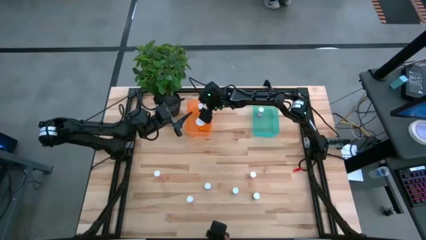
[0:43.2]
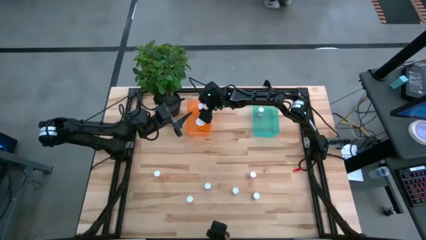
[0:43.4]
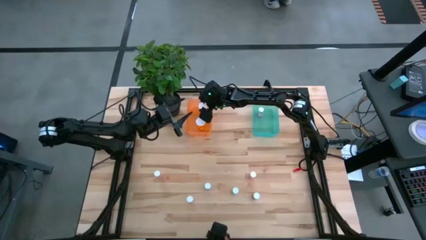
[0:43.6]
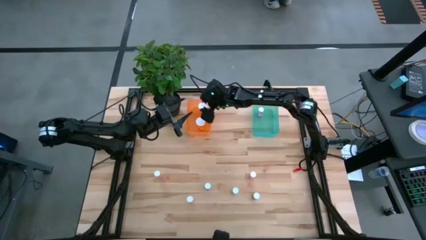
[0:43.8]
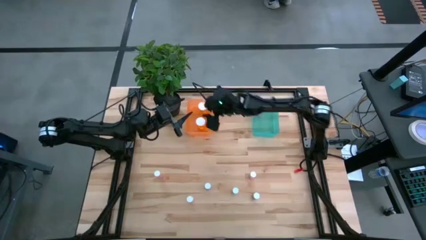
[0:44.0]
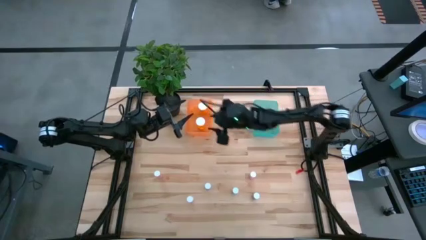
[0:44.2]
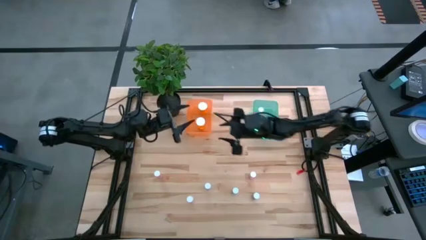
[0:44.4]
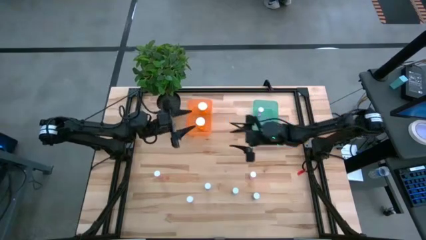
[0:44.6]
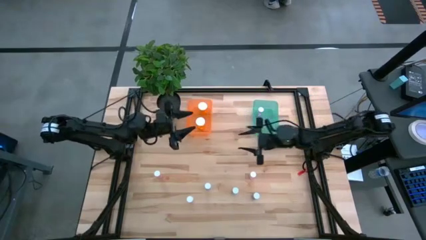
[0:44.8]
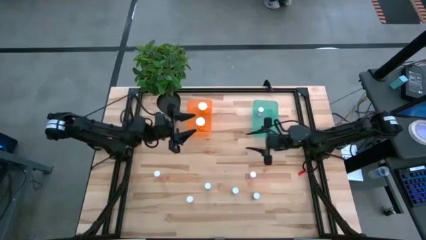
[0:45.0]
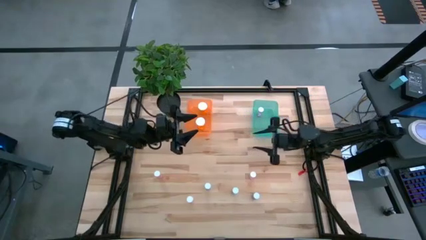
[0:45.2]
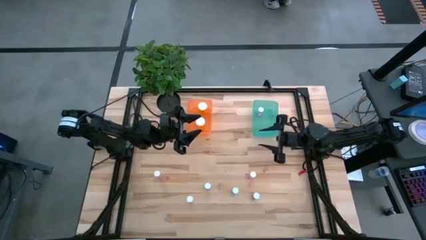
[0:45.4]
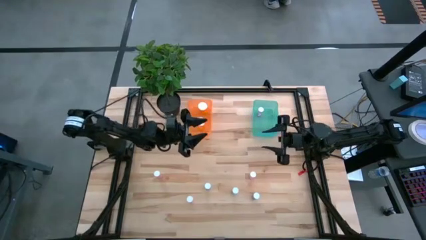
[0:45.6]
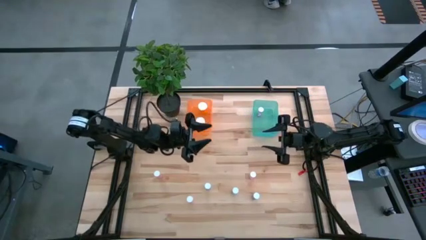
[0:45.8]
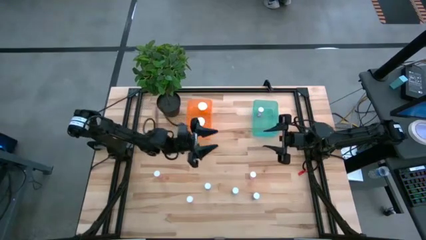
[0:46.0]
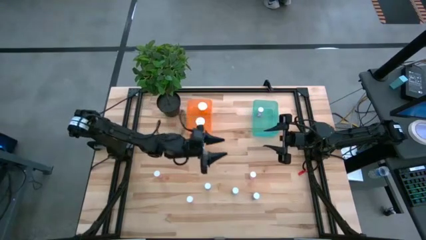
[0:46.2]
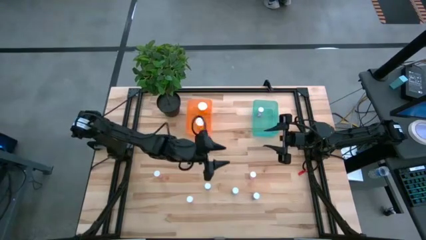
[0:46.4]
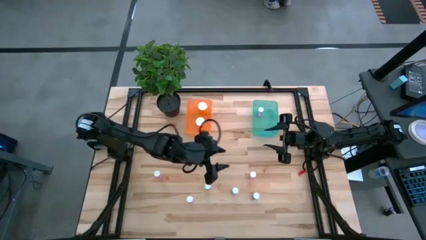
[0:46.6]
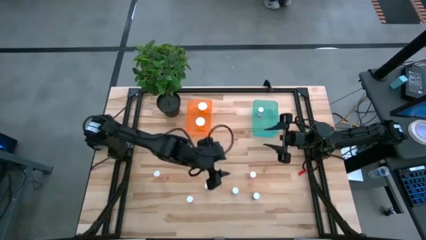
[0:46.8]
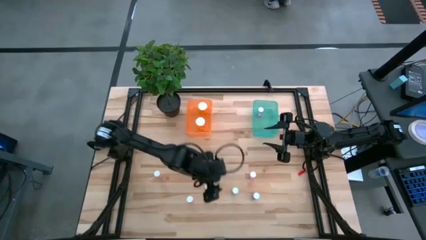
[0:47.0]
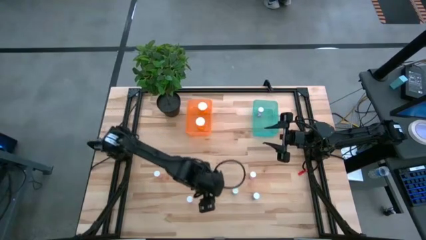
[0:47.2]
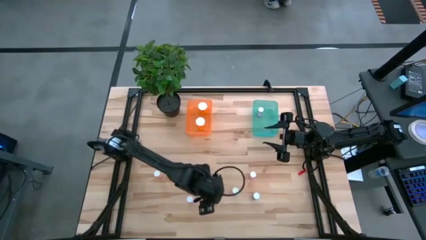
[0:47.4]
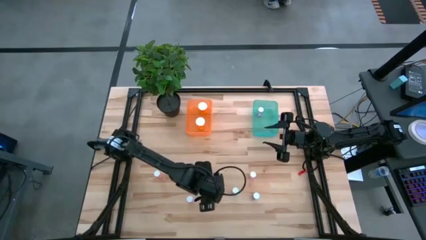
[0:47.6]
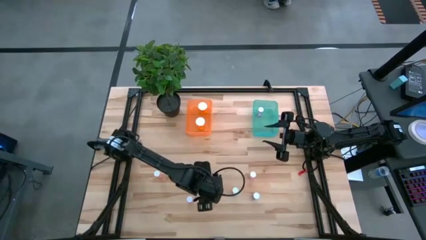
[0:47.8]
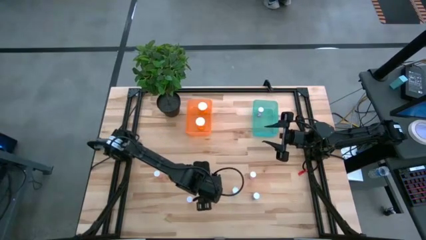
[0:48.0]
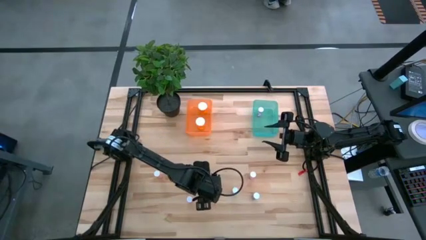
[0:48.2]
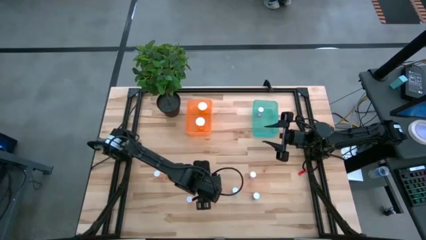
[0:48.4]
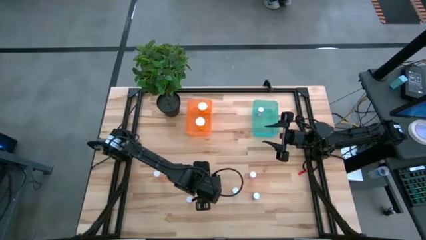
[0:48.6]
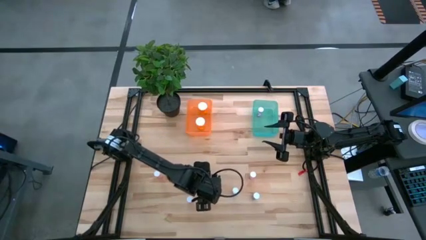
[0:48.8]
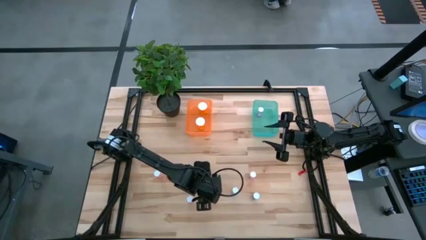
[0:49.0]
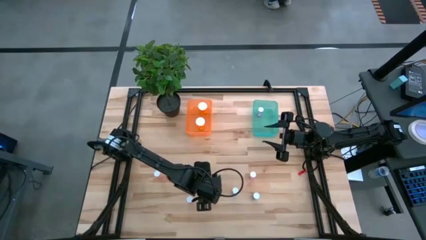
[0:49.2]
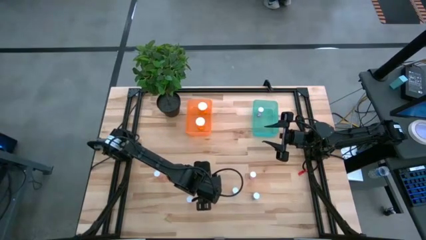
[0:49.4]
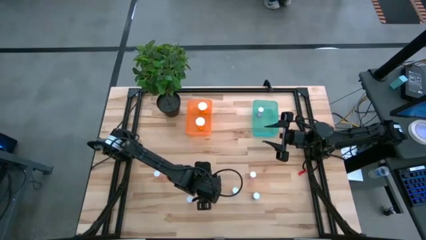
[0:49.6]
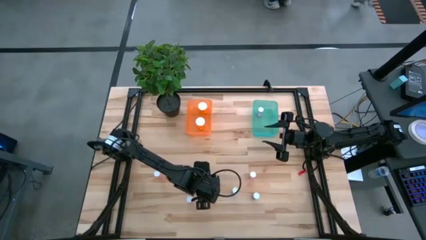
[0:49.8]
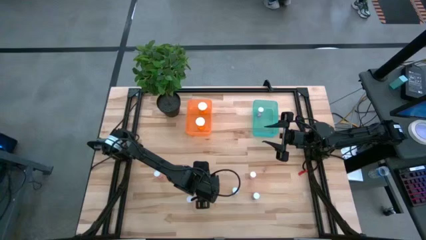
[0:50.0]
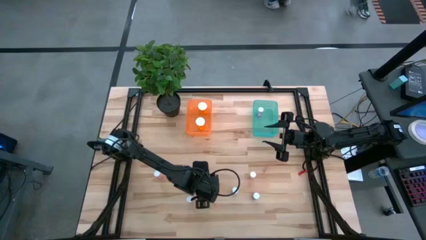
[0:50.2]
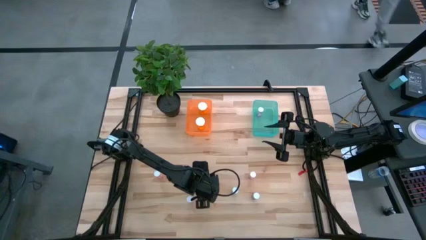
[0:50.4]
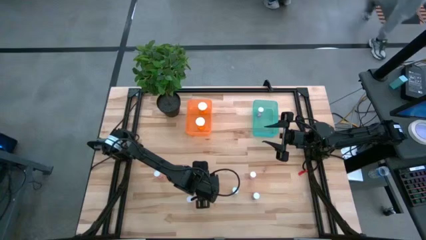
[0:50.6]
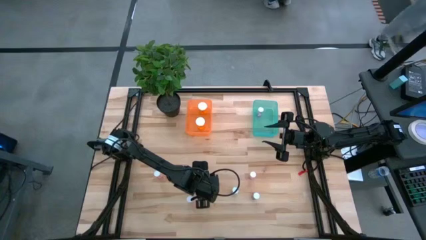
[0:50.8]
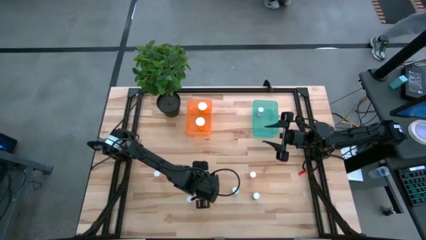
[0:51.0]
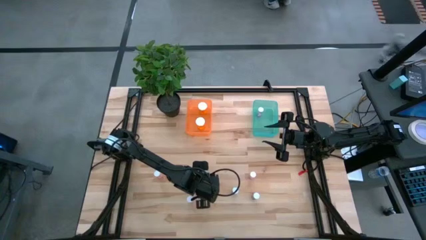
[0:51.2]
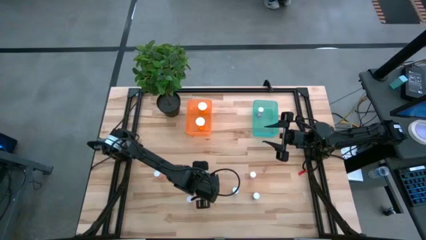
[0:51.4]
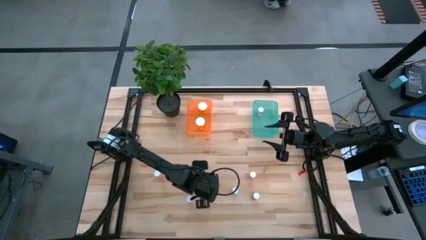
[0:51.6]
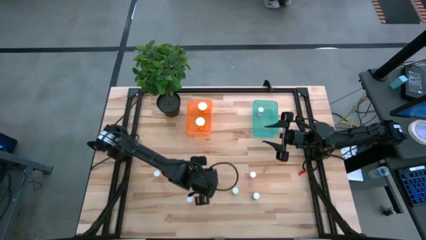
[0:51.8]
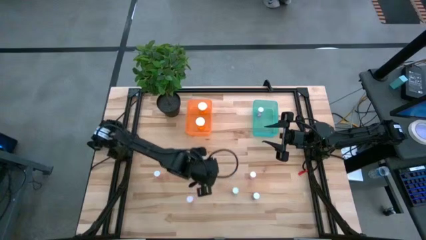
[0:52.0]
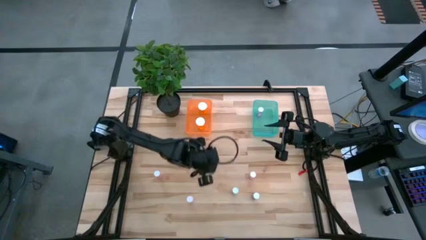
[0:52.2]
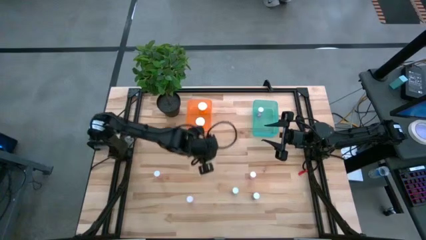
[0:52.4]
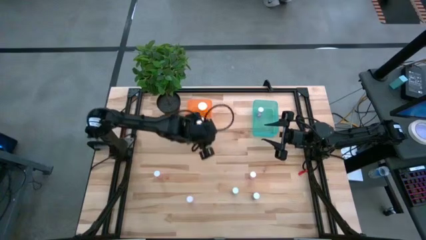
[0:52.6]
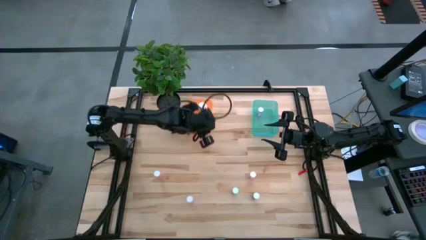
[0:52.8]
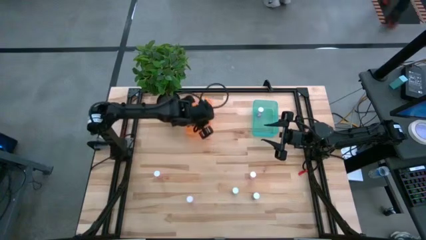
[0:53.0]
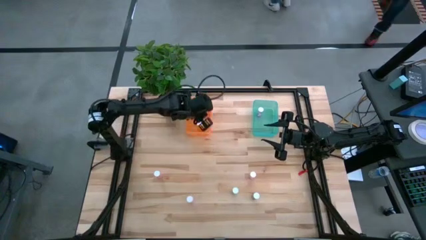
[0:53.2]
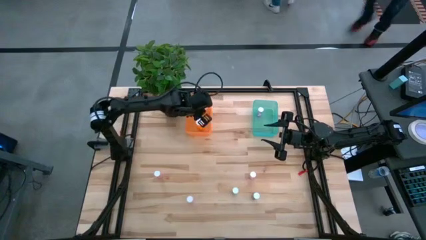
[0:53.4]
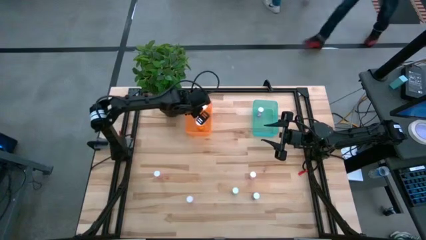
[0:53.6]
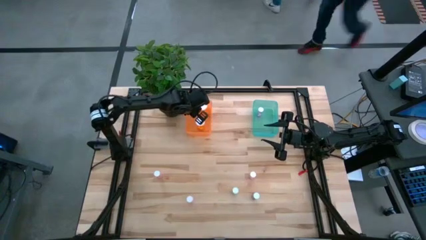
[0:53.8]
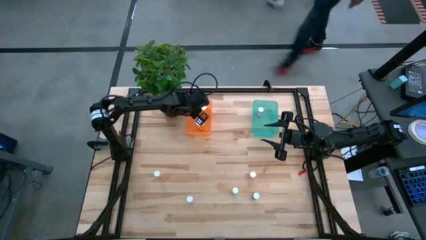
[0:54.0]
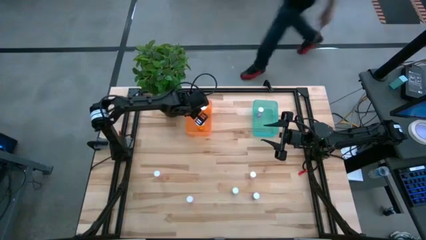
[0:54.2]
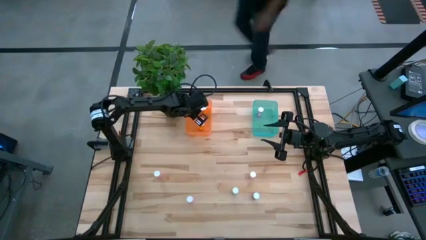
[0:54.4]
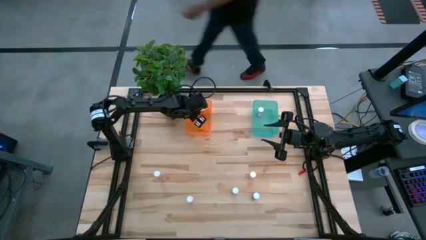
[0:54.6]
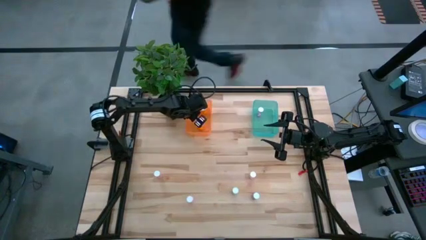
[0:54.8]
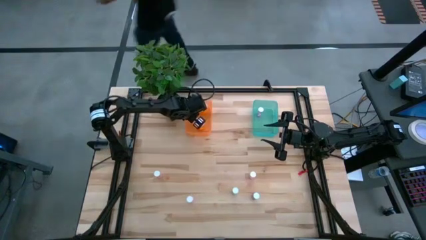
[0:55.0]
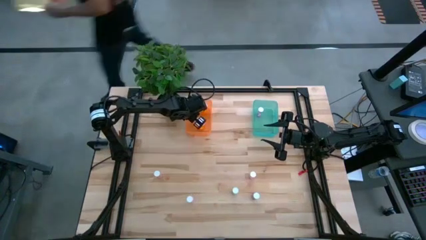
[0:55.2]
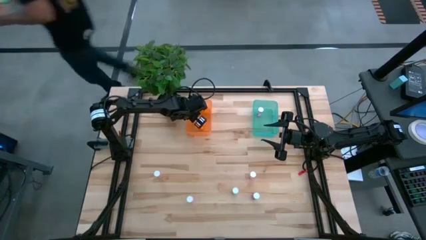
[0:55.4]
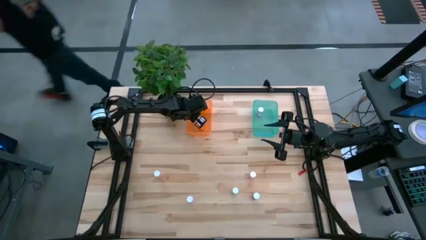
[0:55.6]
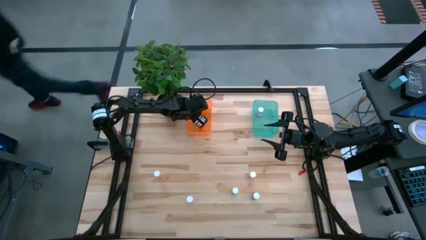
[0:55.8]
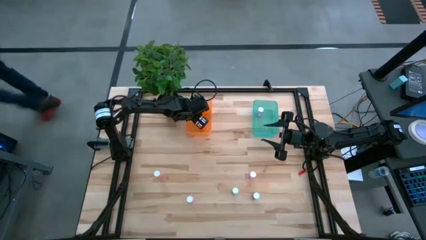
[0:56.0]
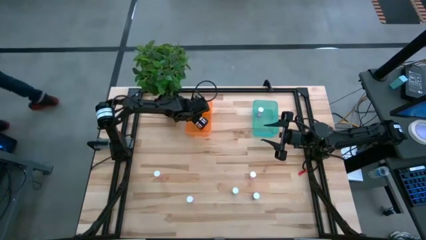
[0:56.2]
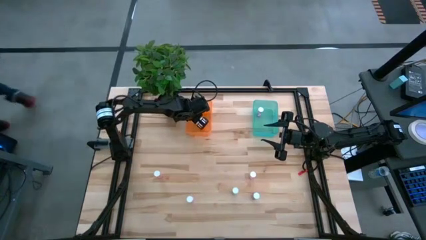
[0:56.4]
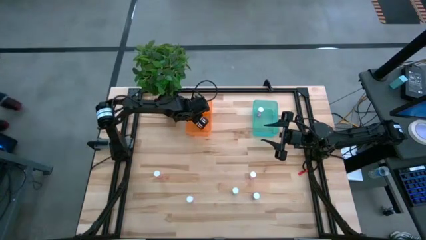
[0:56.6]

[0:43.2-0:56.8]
Task: Pick and place medicine bottles into bin by pill shape (circle, oval)
Put the left blue capsule bottle into the orange bin
